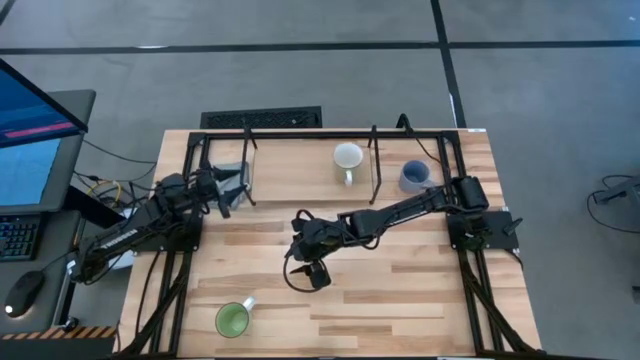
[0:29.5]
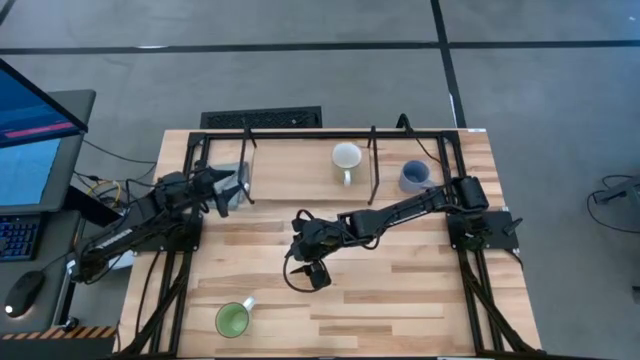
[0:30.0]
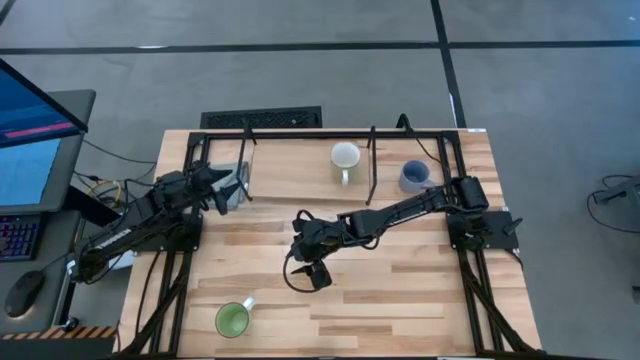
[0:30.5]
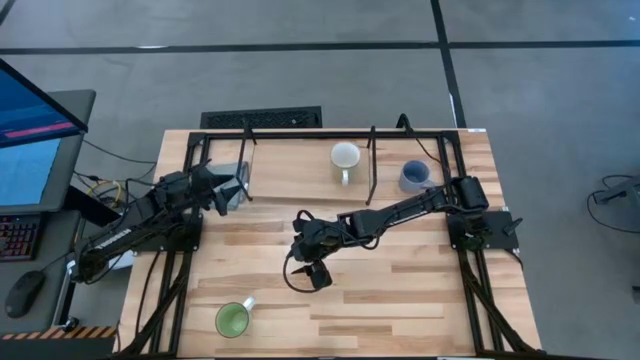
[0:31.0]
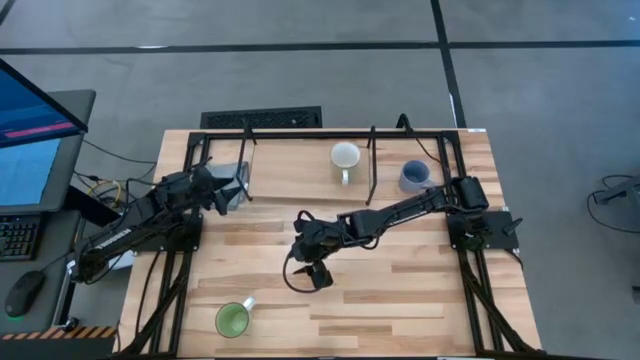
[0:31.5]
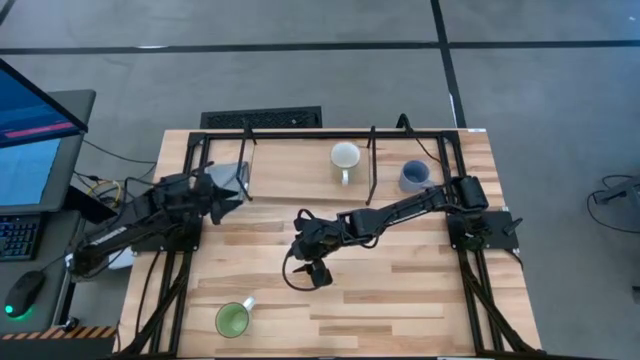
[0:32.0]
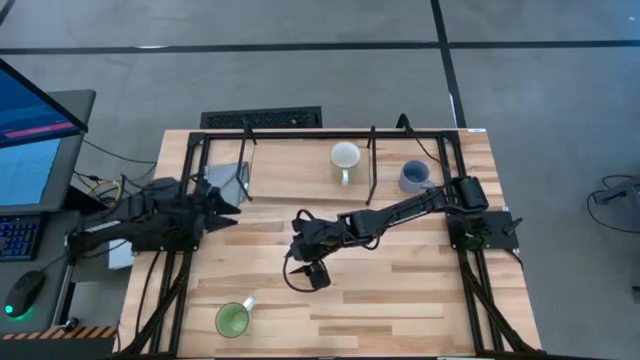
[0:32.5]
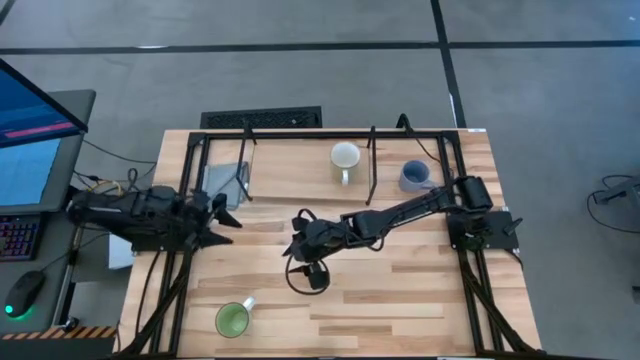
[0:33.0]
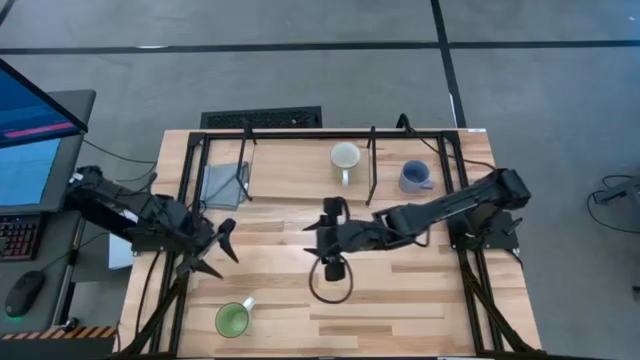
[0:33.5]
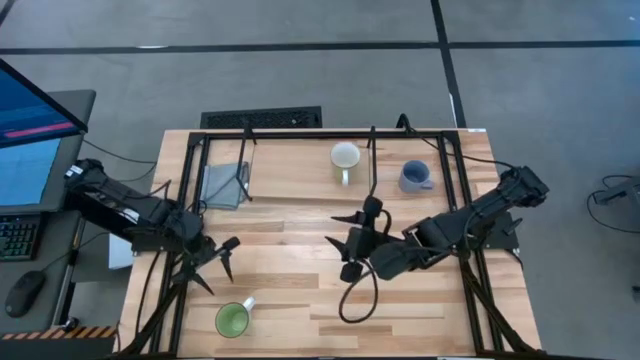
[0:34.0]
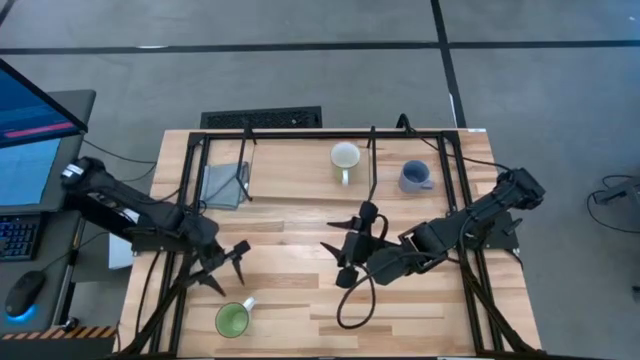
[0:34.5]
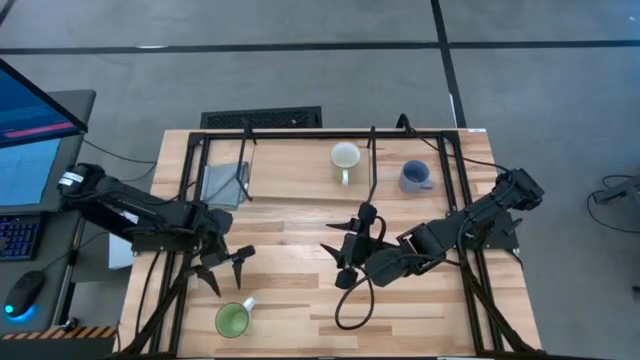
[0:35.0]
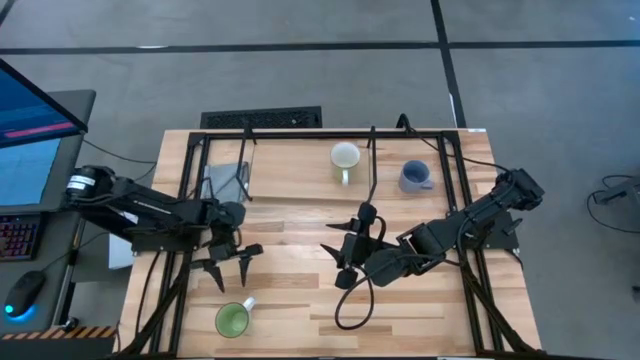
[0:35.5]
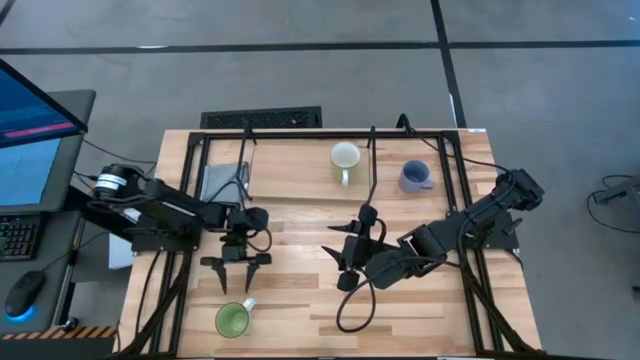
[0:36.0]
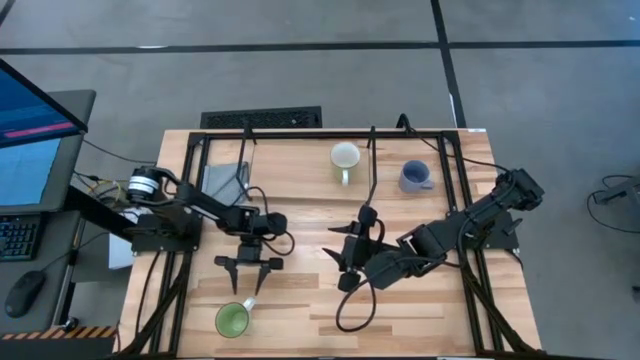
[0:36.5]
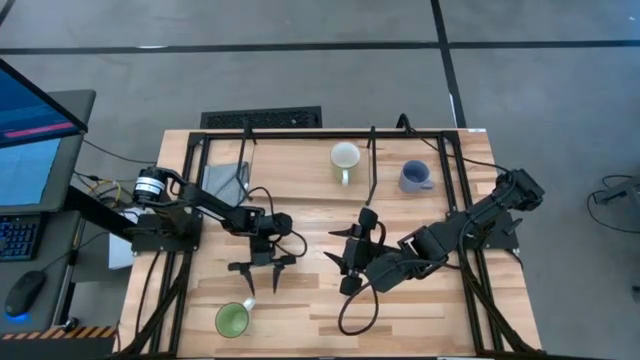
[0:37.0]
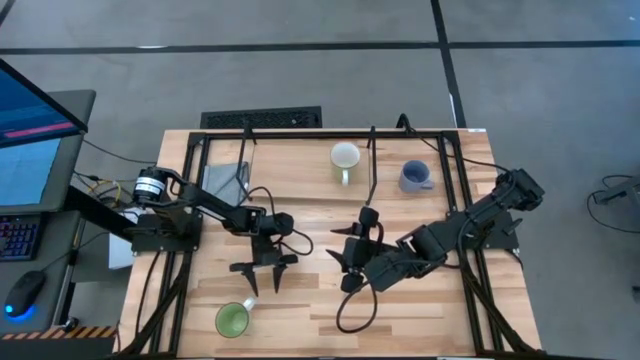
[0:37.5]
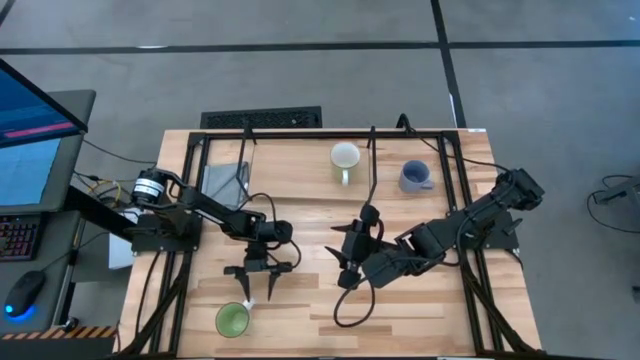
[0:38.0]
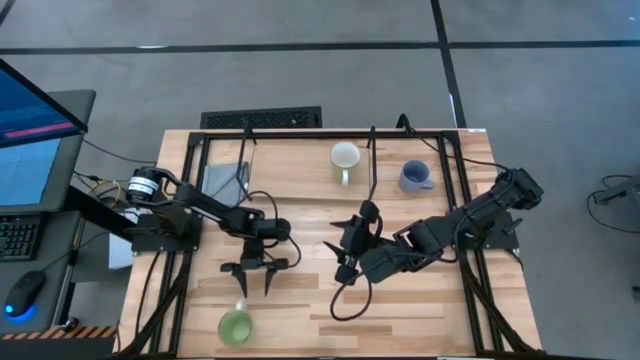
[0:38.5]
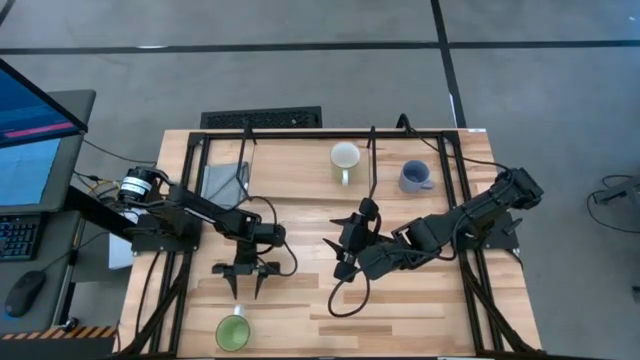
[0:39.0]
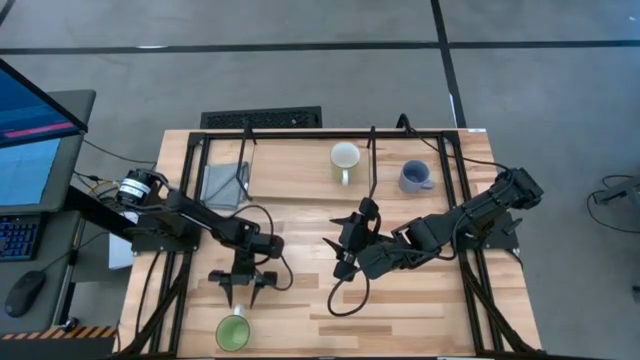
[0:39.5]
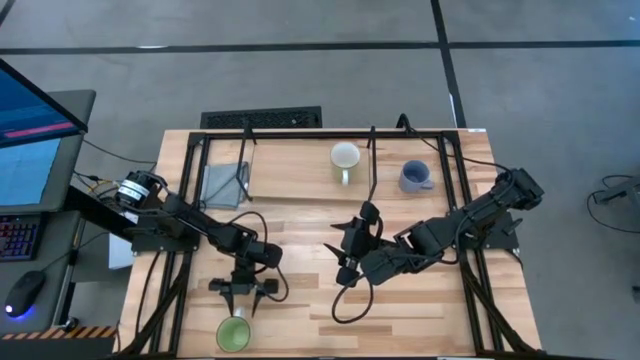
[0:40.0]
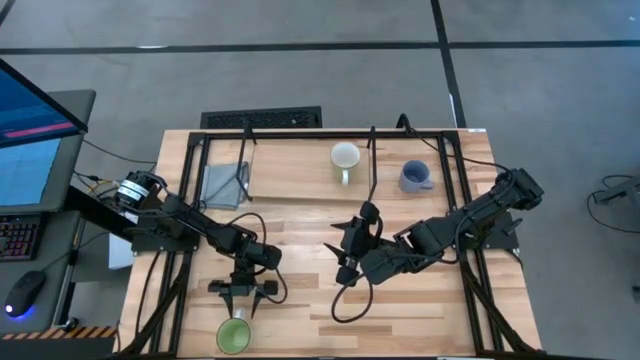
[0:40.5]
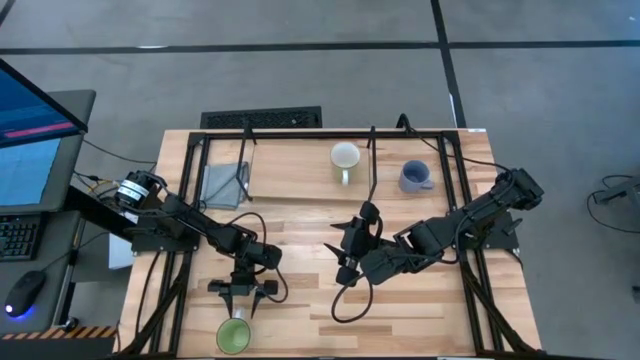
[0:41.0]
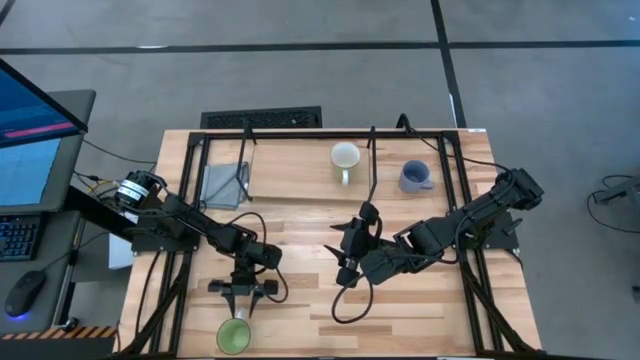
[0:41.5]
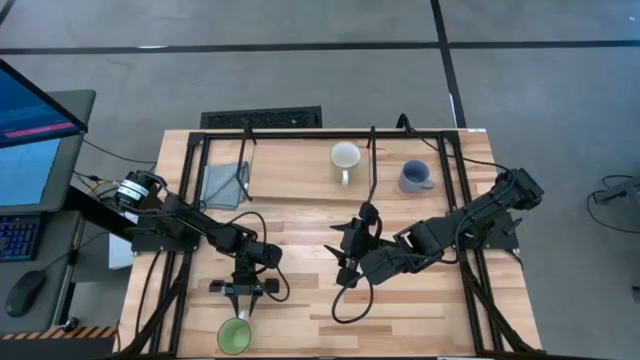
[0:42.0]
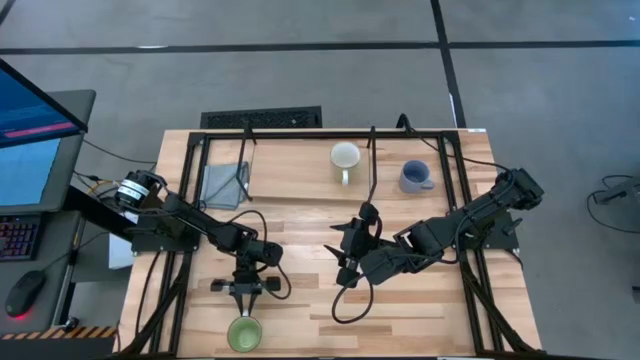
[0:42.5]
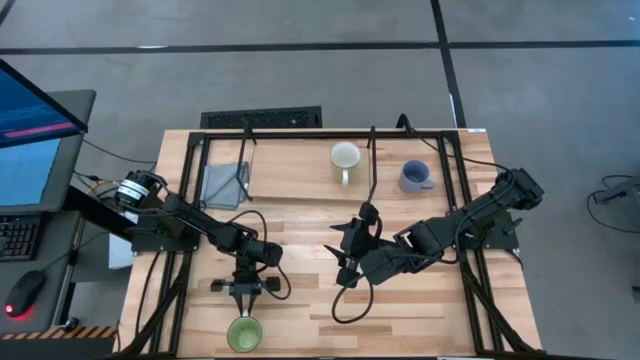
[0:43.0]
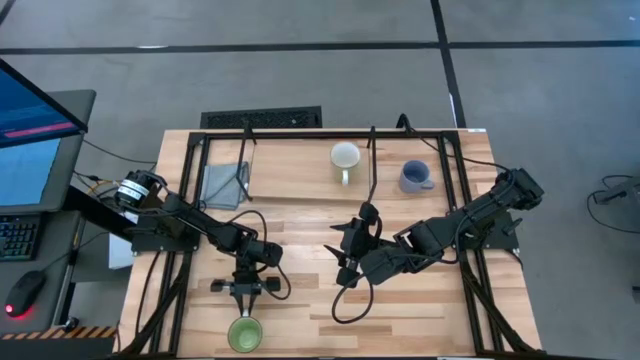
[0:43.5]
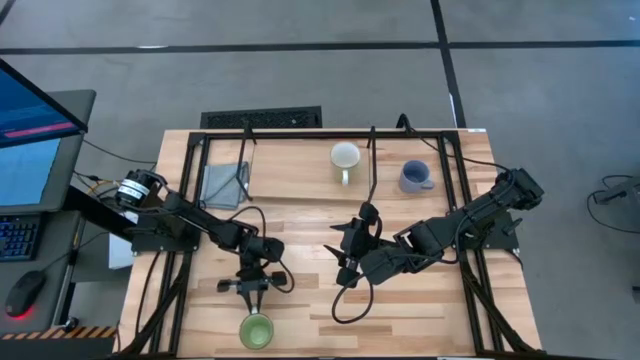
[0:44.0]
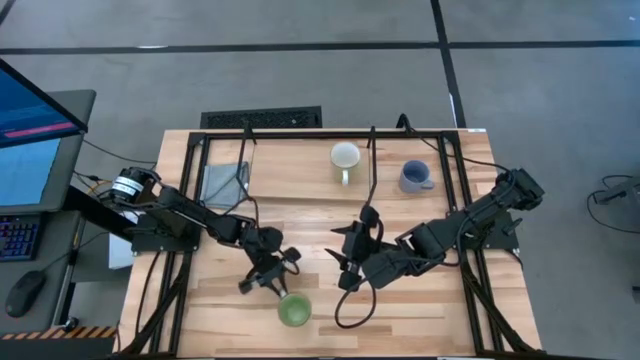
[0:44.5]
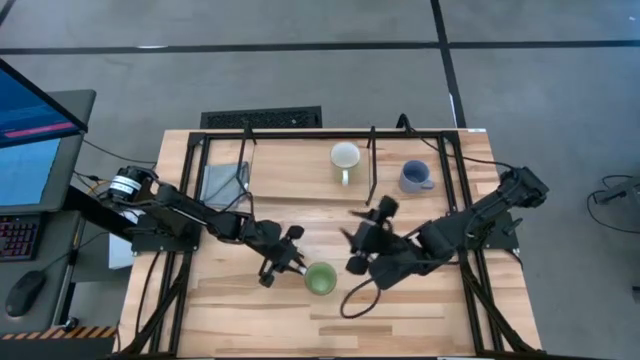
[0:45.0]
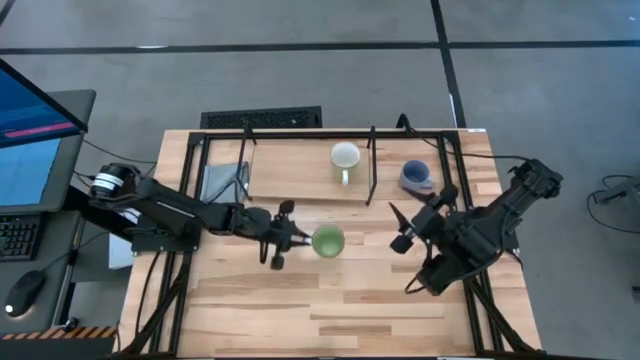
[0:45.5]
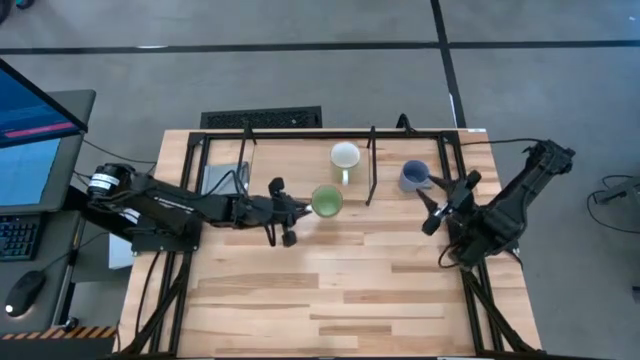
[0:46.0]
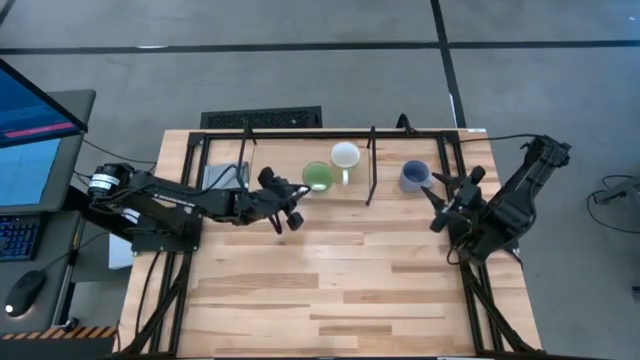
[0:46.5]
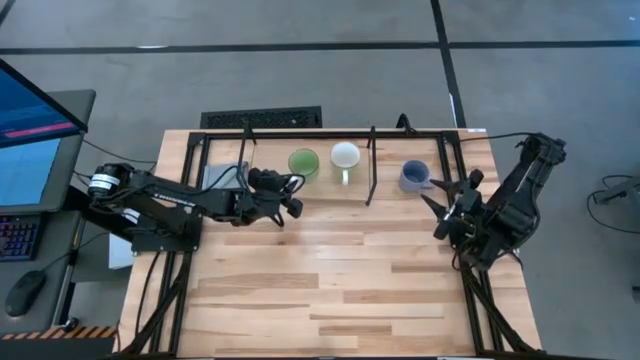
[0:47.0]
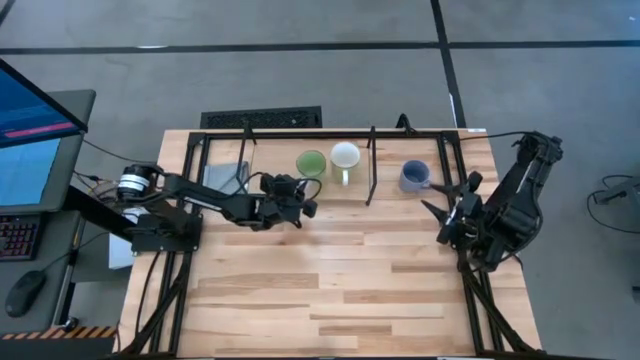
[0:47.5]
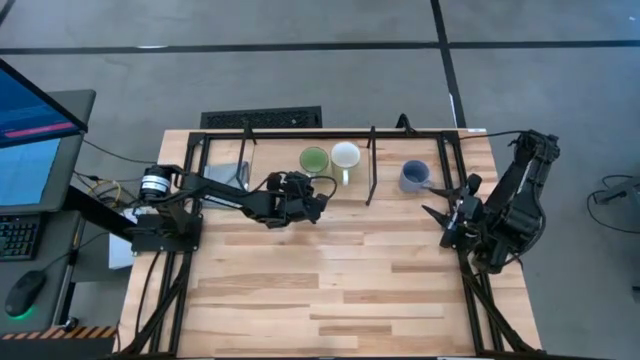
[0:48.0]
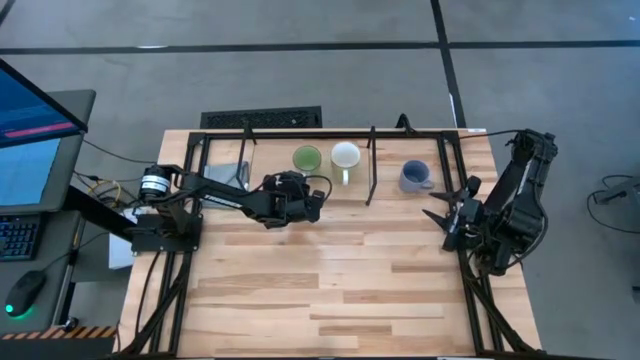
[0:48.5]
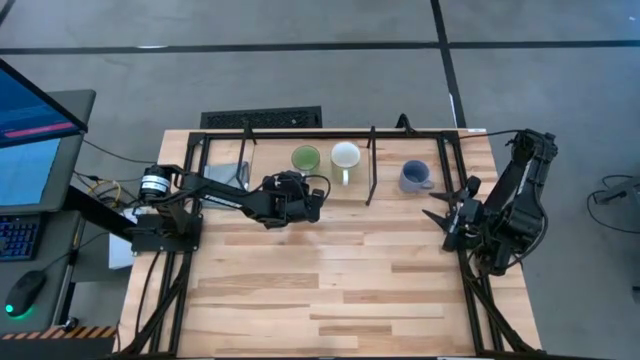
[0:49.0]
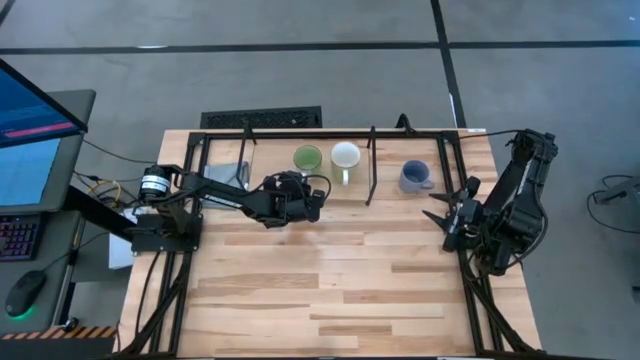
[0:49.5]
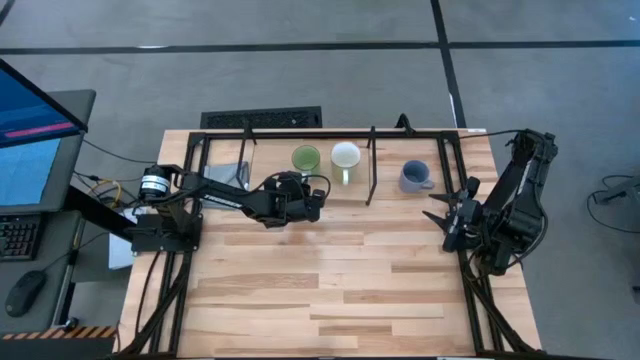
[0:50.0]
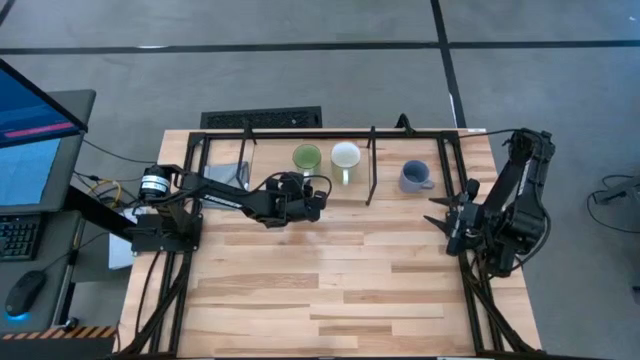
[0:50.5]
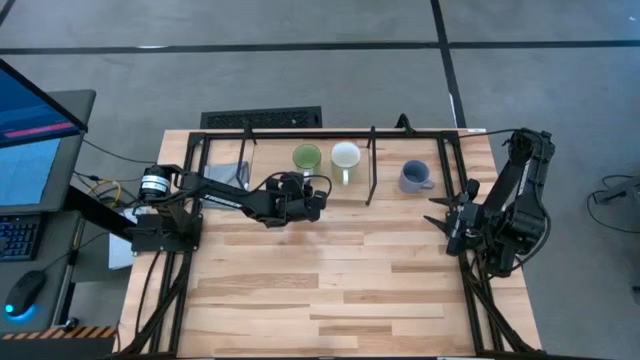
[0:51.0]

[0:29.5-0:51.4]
Task: Stack small to large cups/mugs on shelf
Put the green mug on the shelf
